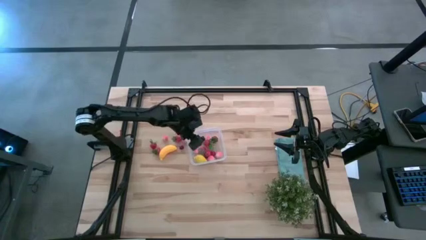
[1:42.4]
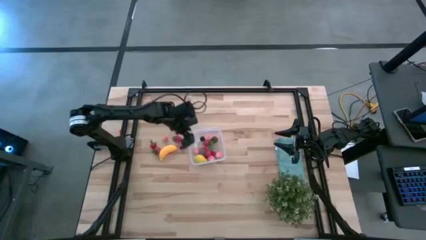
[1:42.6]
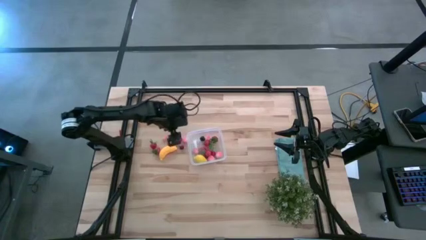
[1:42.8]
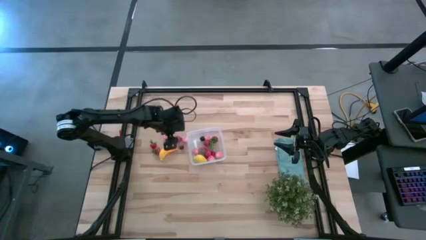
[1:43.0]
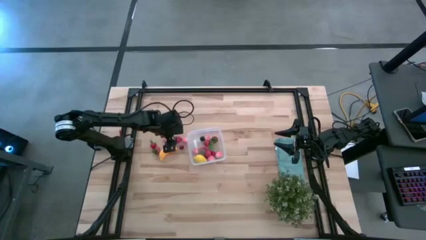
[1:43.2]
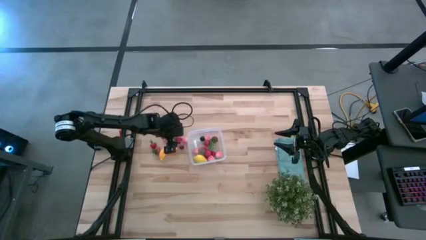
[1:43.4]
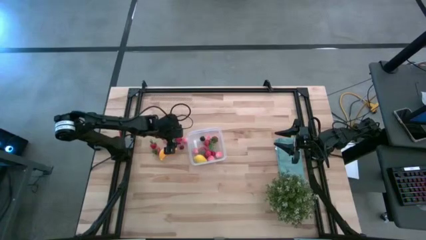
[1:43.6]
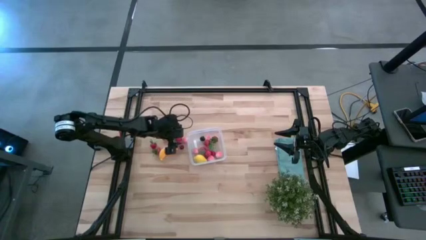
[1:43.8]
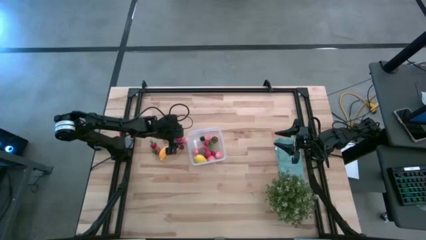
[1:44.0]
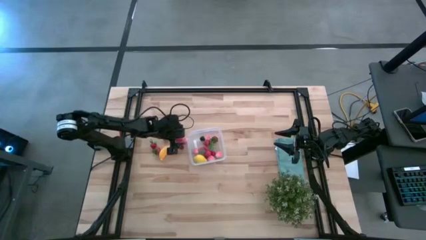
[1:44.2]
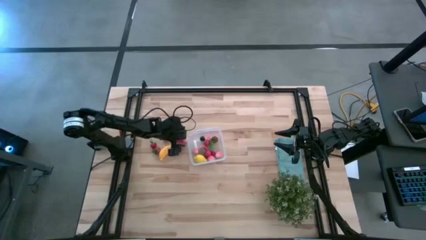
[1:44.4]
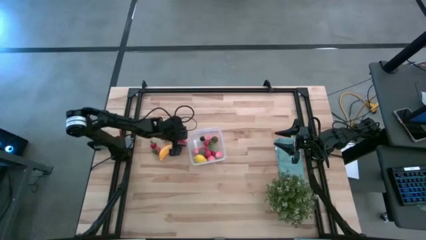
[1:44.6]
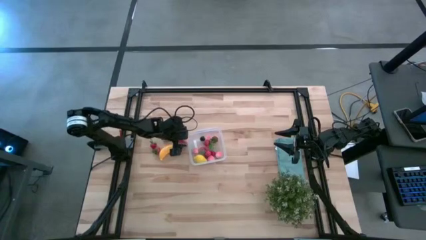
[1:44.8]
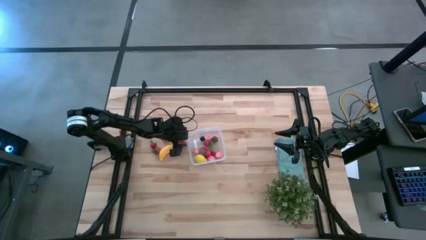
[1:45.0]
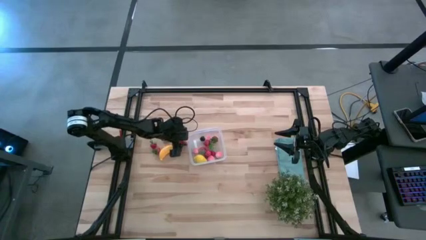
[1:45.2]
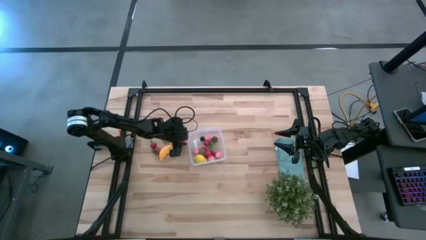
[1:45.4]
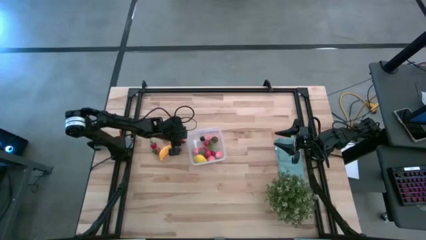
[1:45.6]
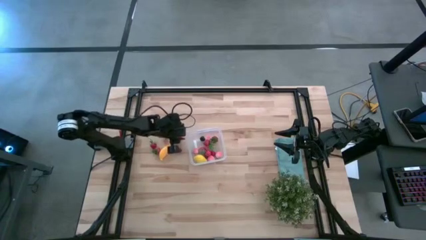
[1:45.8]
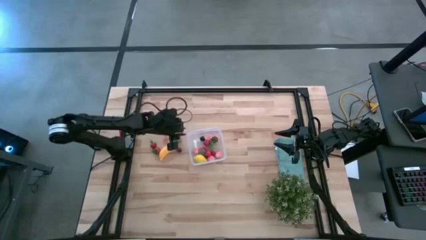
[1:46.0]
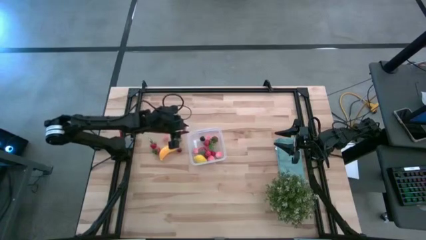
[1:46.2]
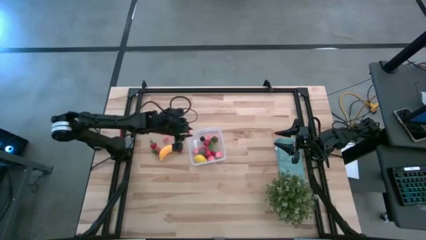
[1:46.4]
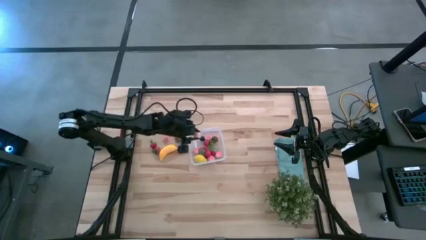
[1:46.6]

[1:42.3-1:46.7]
Task: Pick and placing Produce into tupperware
Put the peach into the transparent bin

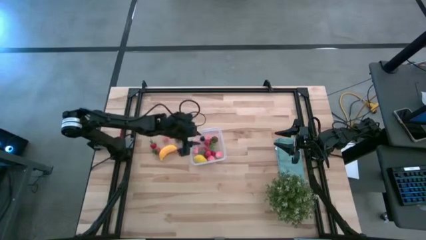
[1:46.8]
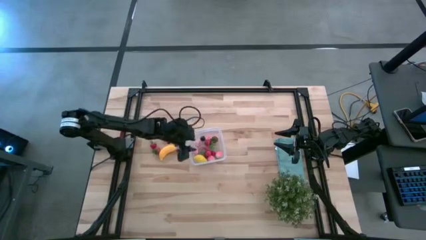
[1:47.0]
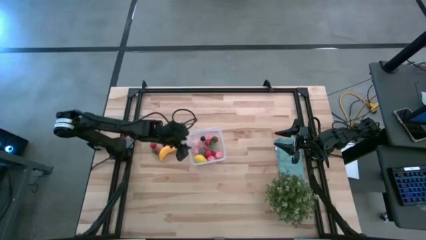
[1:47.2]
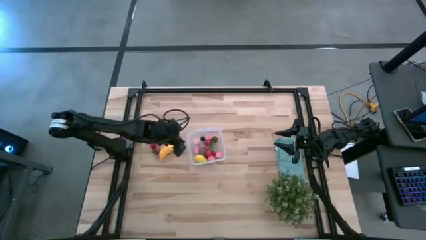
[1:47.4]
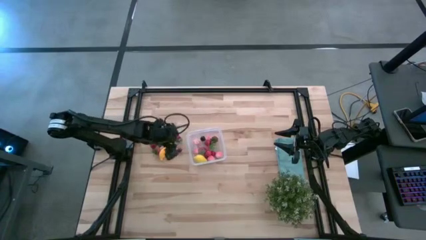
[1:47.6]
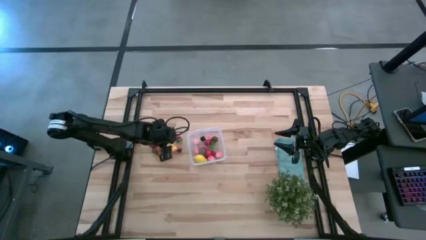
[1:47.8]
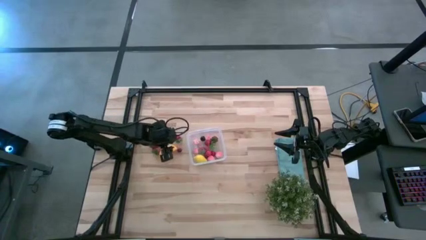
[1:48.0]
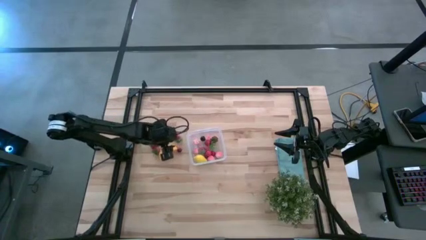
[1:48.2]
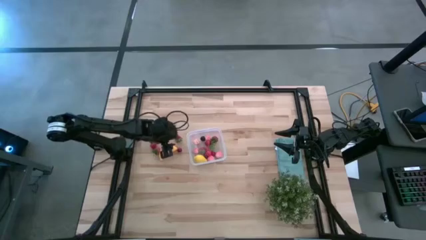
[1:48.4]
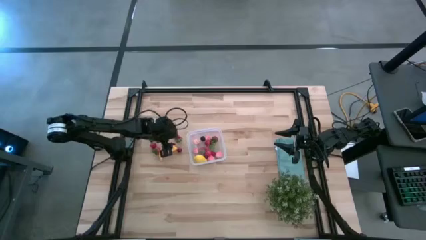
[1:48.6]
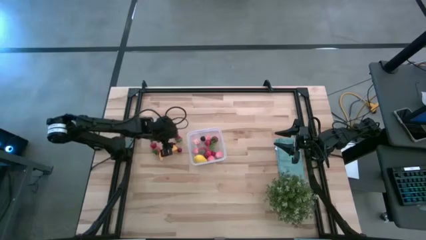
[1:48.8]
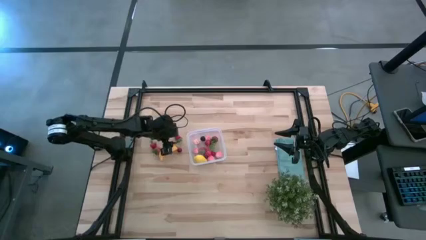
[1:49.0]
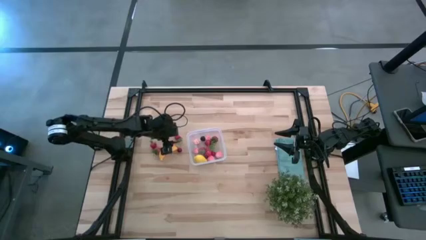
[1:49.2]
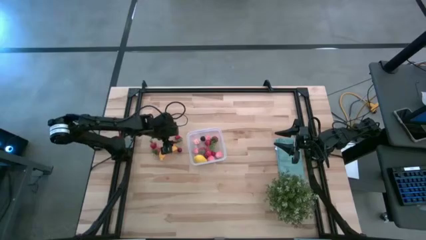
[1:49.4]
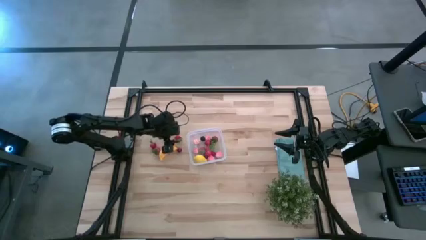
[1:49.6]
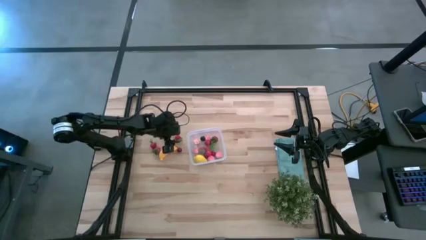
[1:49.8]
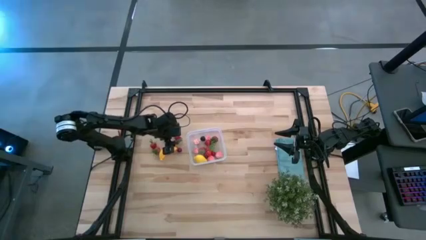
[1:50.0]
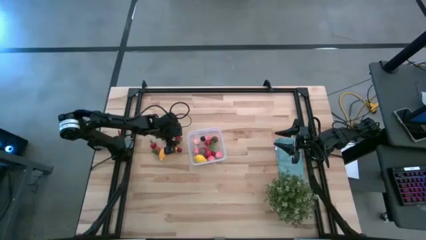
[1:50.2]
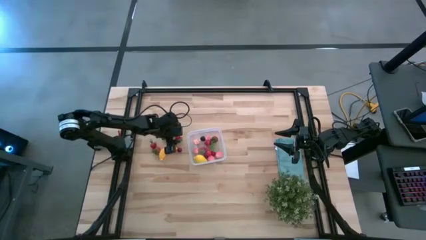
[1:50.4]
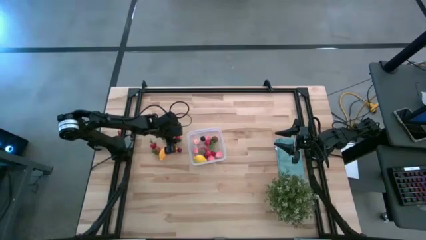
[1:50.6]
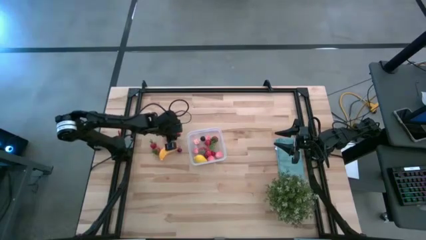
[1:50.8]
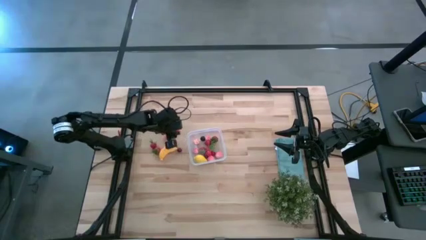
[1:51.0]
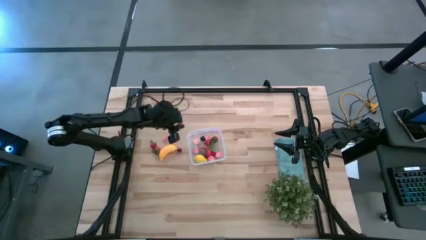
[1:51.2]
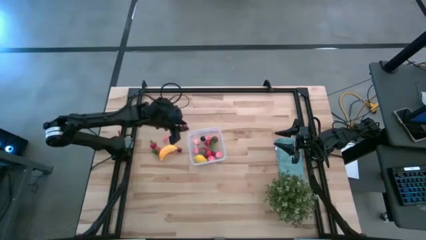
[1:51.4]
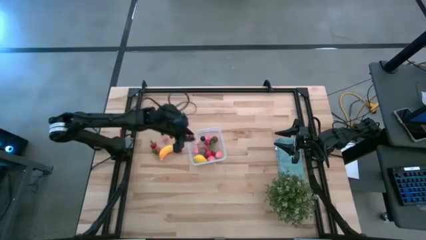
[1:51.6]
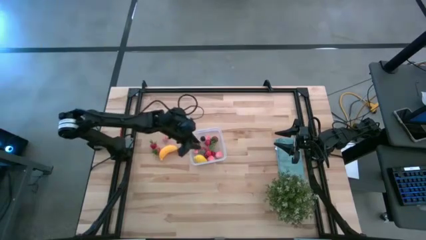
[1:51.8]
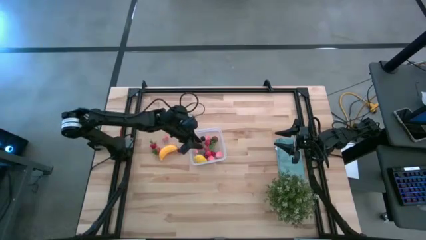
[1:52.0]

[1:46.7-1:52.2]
Put the strawberry into the transparent bin

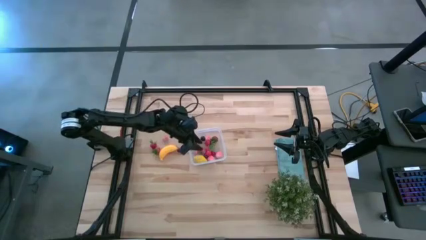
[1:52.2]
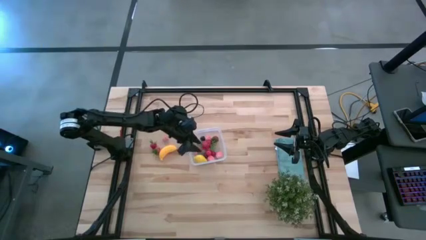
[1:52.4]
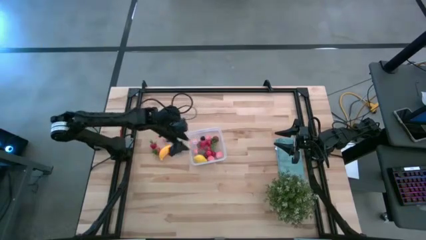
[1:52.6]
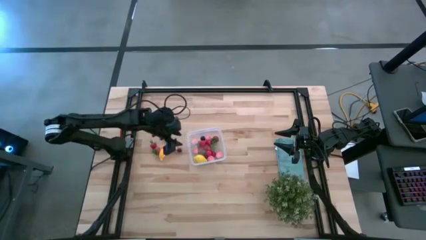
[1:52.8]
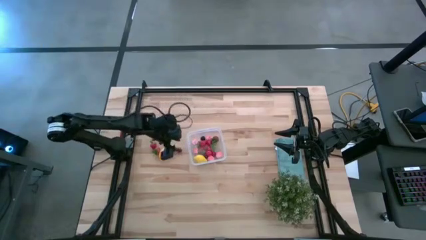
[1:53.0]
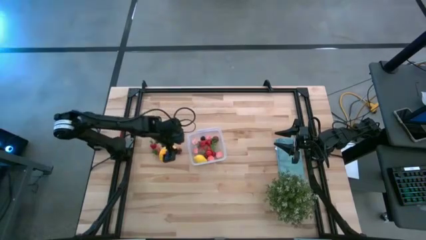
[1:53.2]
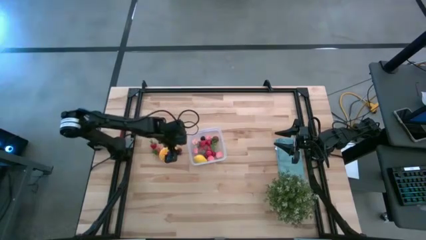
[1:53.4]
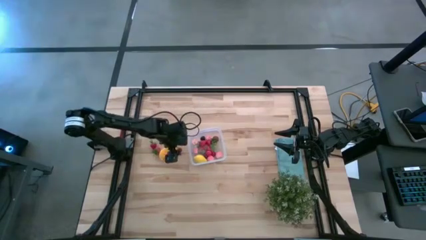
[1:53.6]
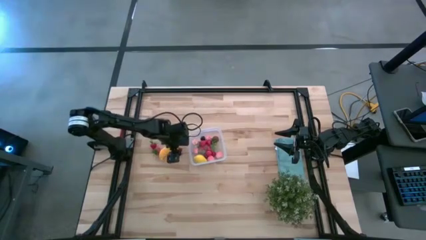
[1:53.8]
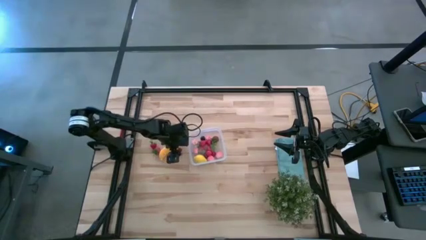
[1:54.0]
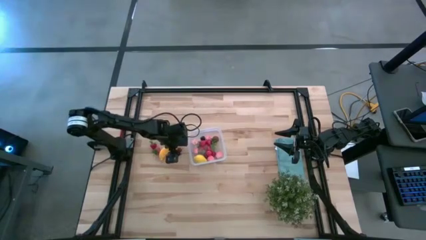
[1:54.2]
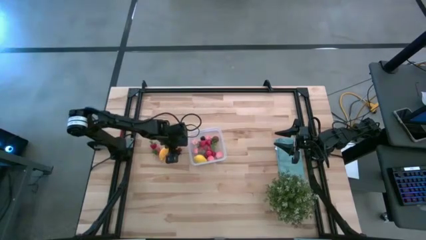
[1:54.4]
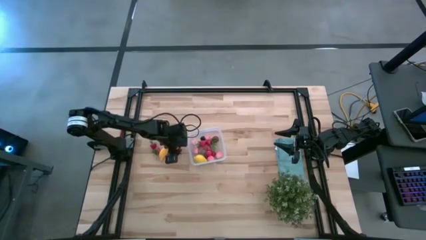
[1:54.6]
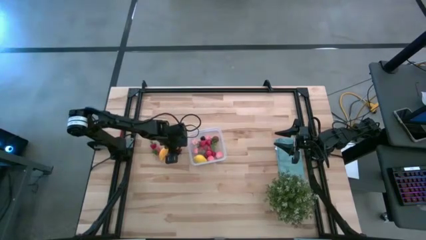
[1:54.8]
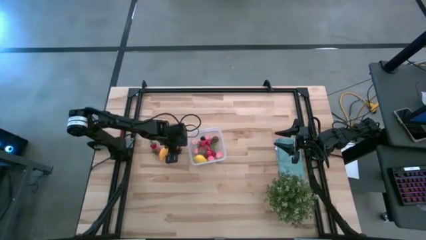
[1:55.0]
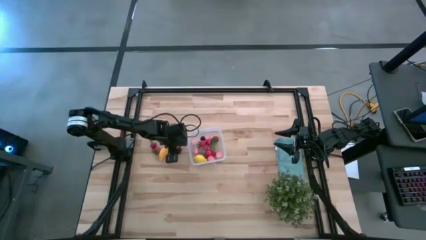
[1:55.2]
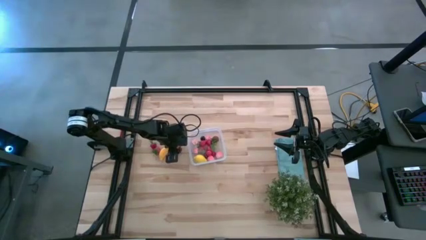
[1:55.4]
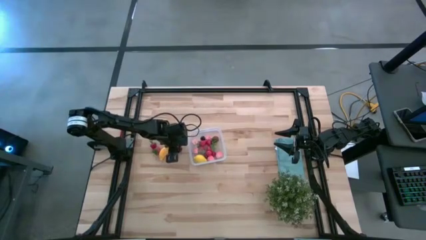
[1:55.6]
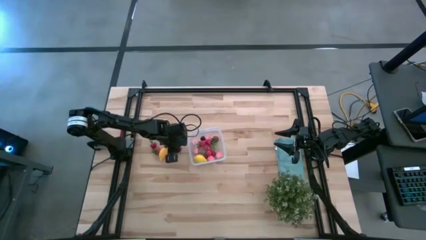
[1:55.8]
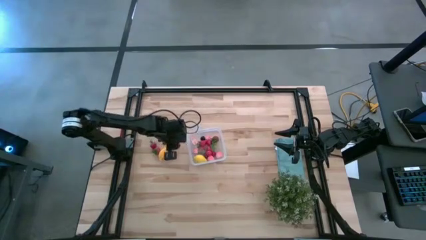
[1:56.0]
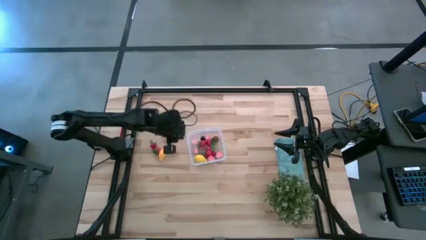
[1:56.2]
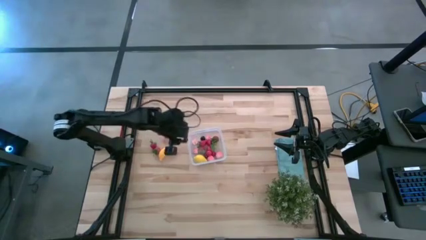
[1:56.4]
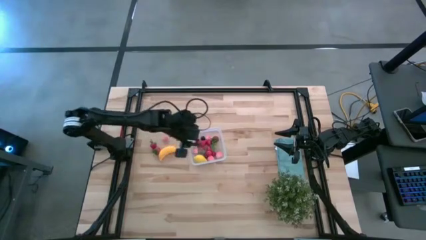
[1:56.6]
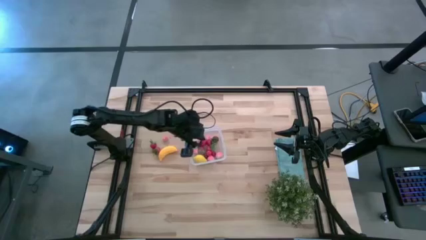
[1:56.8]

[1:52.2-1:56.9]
Put the red cherry into the transparent bin
